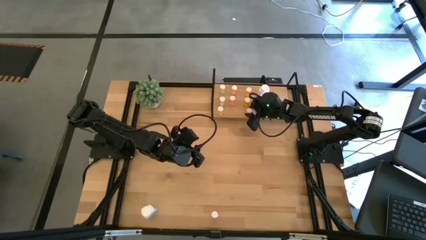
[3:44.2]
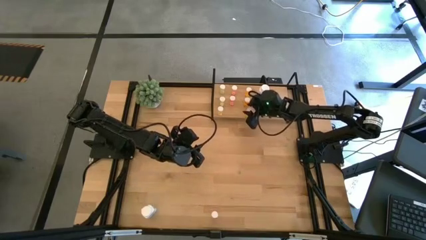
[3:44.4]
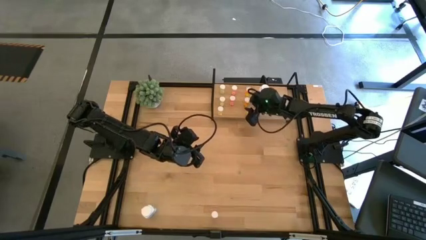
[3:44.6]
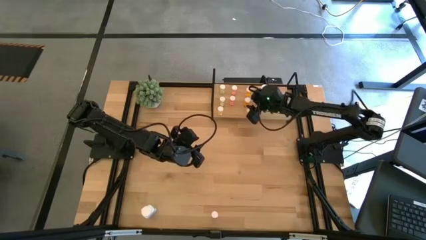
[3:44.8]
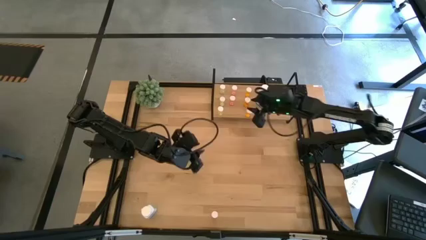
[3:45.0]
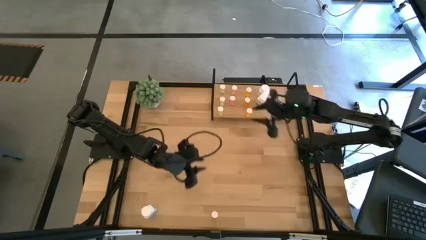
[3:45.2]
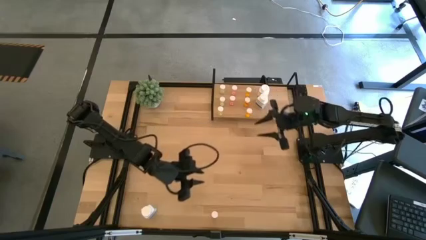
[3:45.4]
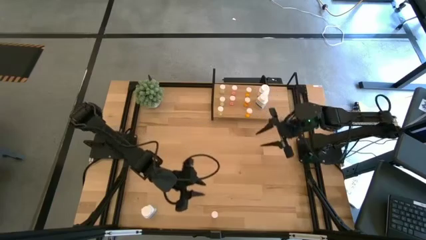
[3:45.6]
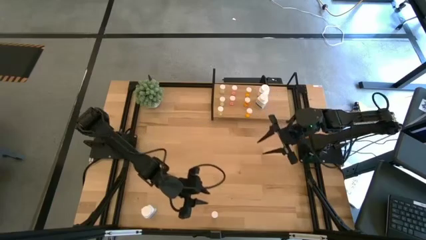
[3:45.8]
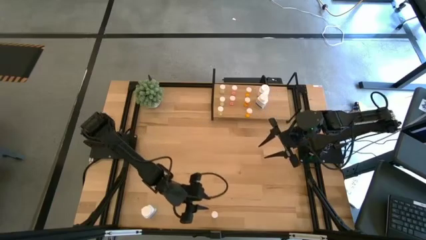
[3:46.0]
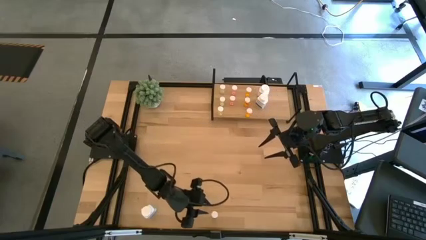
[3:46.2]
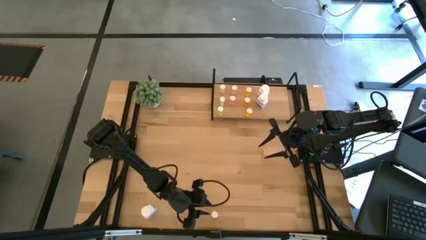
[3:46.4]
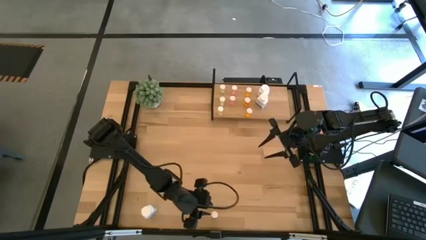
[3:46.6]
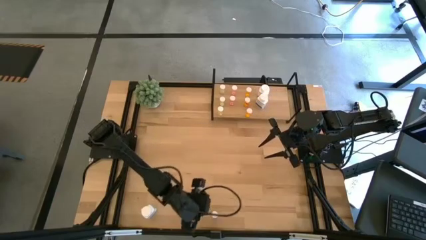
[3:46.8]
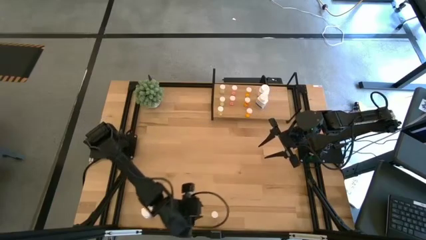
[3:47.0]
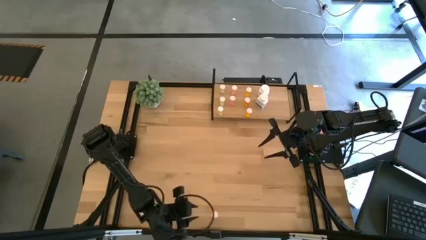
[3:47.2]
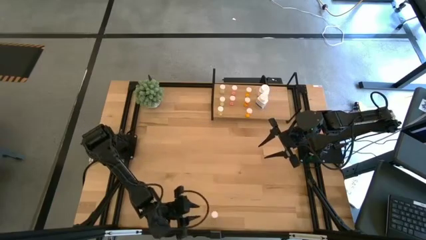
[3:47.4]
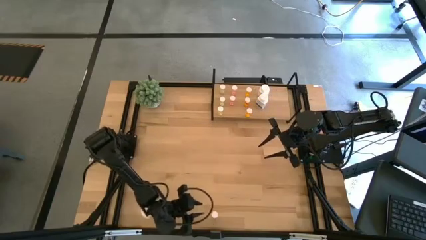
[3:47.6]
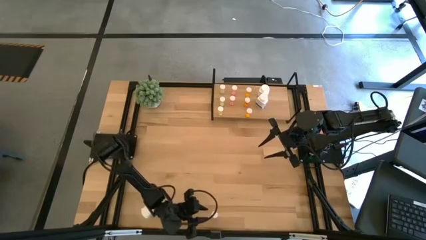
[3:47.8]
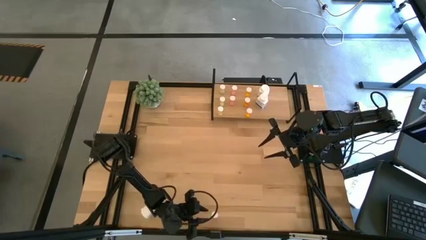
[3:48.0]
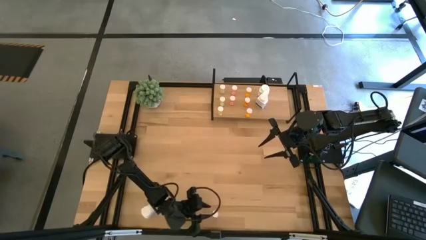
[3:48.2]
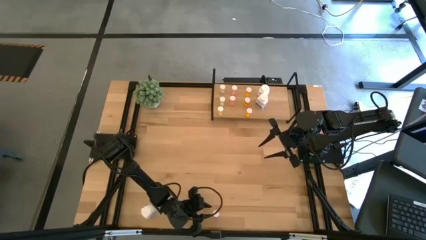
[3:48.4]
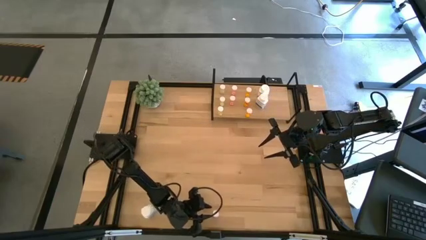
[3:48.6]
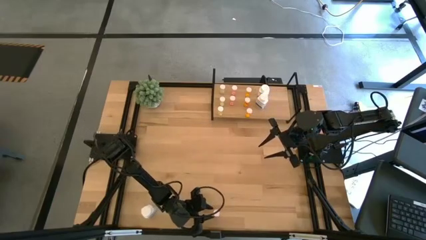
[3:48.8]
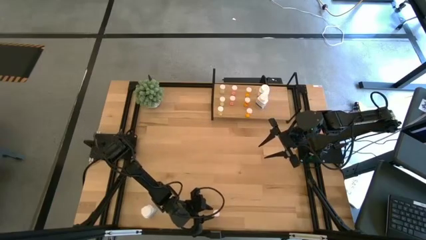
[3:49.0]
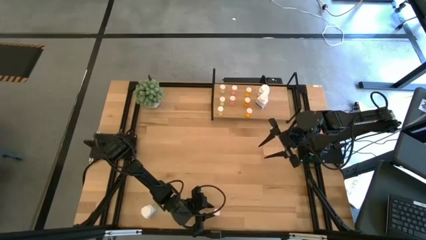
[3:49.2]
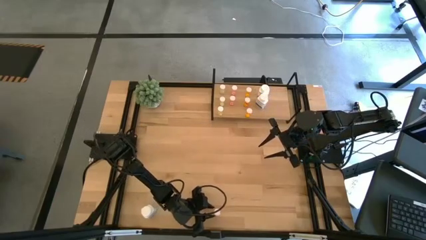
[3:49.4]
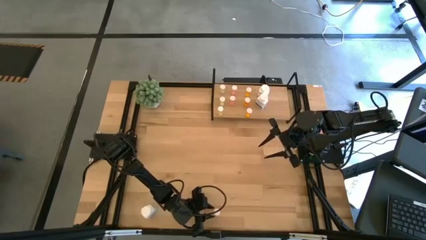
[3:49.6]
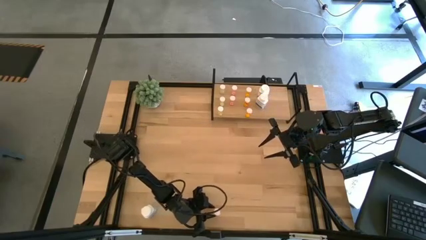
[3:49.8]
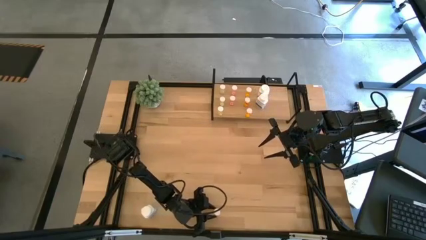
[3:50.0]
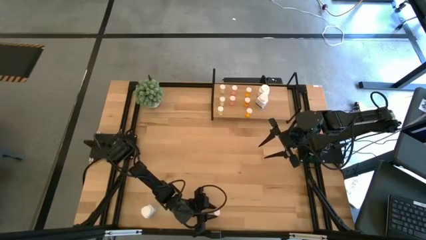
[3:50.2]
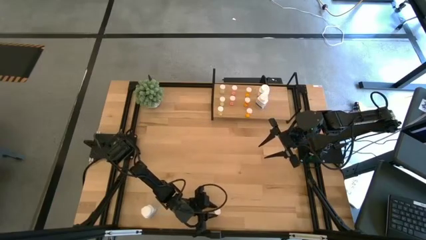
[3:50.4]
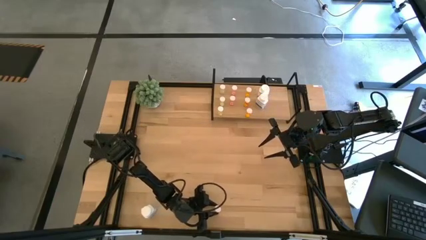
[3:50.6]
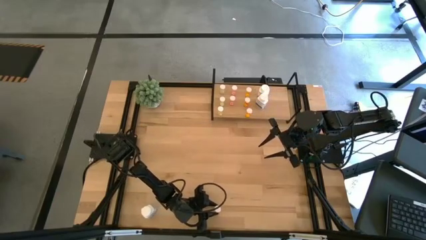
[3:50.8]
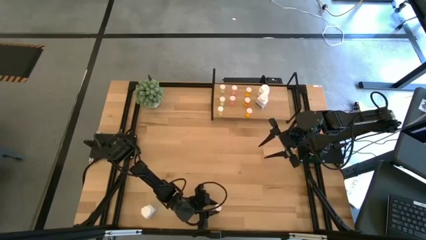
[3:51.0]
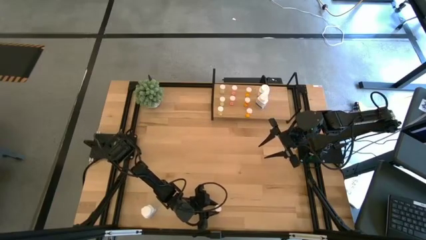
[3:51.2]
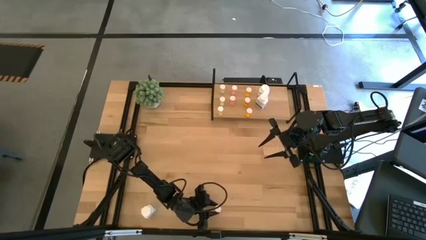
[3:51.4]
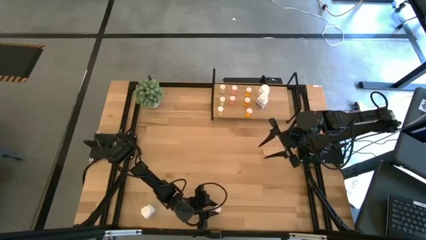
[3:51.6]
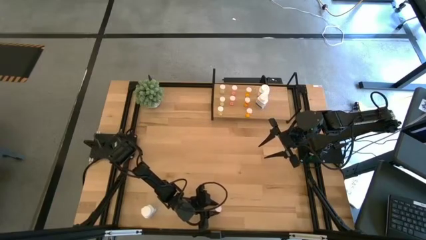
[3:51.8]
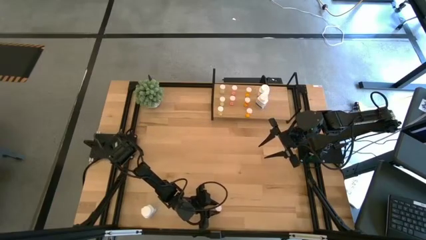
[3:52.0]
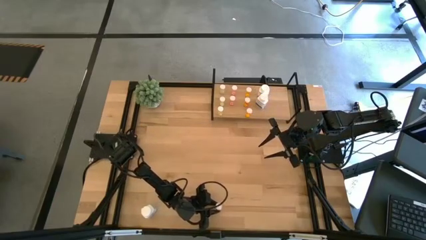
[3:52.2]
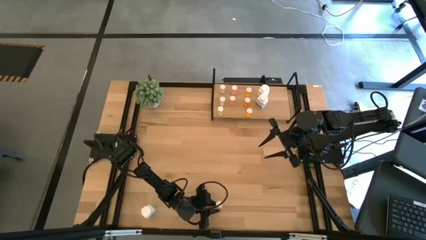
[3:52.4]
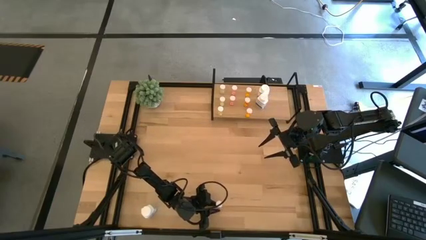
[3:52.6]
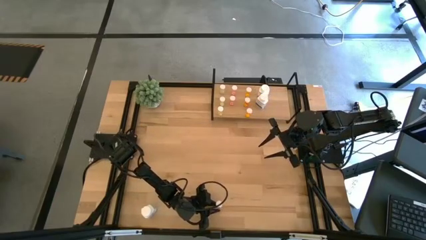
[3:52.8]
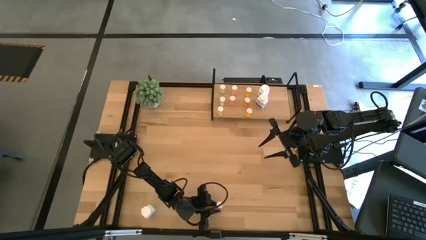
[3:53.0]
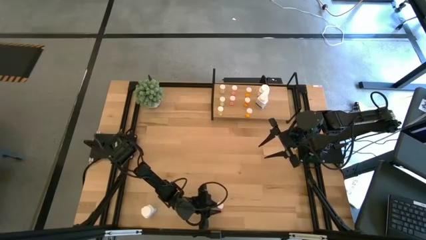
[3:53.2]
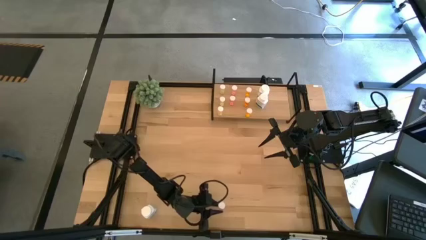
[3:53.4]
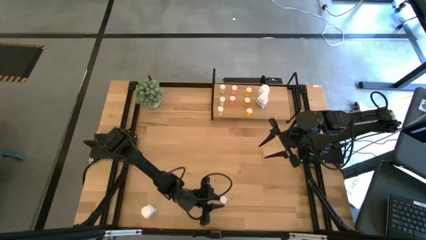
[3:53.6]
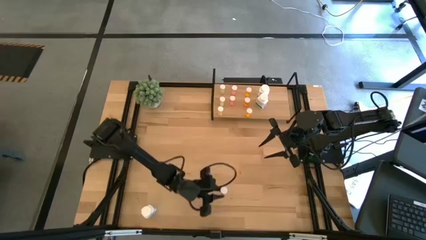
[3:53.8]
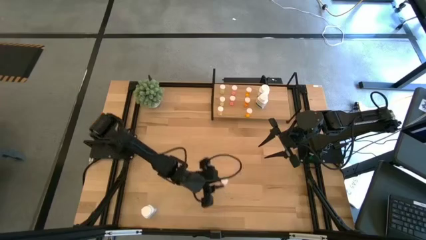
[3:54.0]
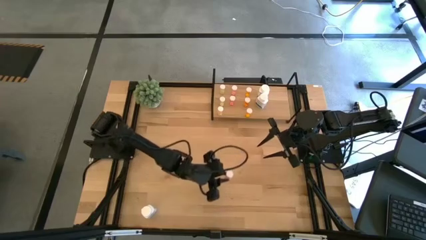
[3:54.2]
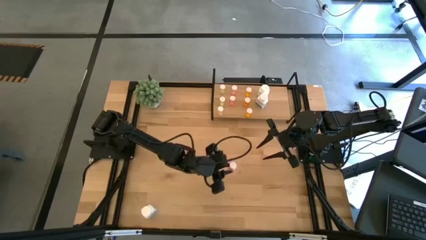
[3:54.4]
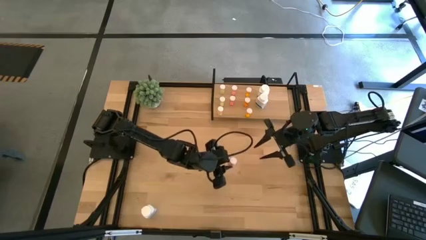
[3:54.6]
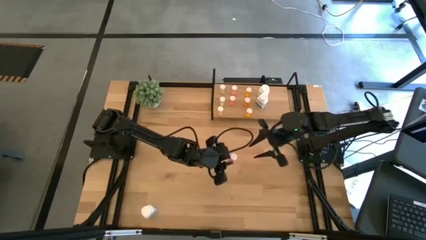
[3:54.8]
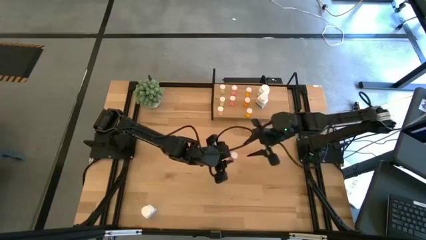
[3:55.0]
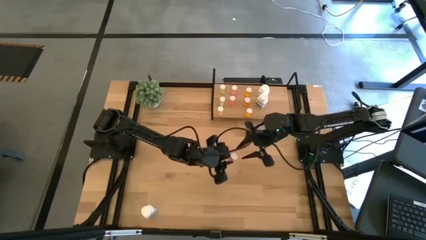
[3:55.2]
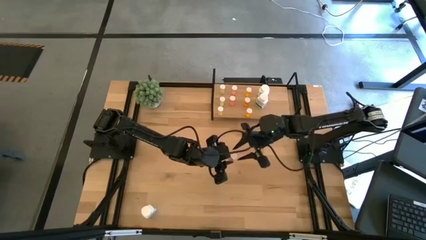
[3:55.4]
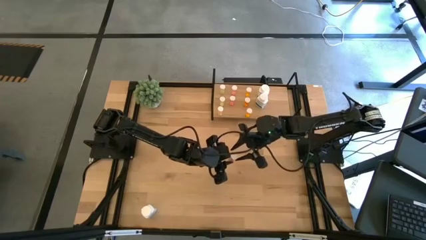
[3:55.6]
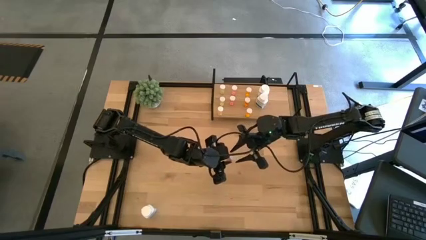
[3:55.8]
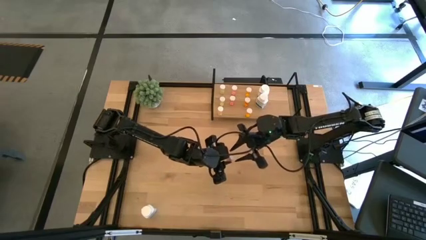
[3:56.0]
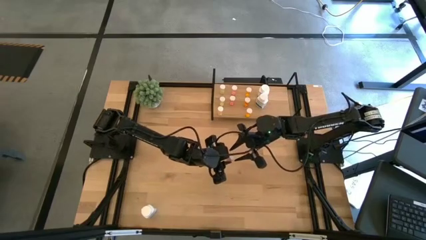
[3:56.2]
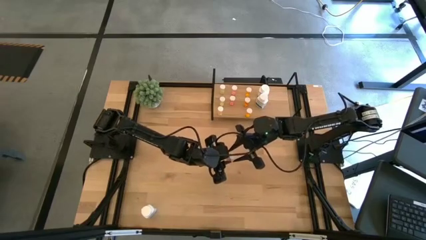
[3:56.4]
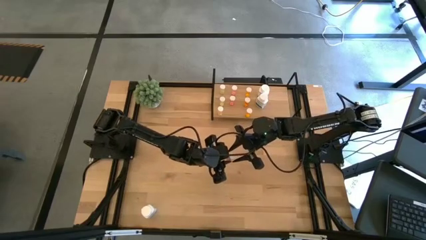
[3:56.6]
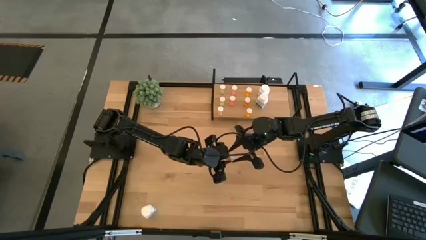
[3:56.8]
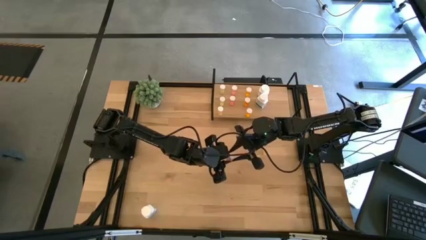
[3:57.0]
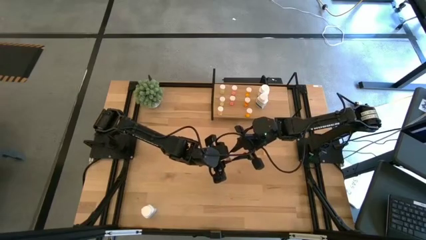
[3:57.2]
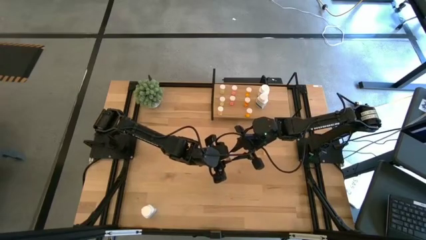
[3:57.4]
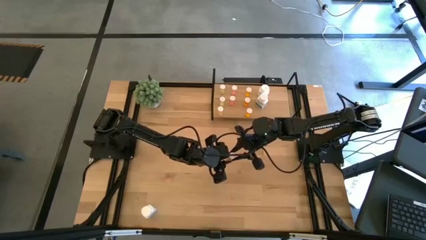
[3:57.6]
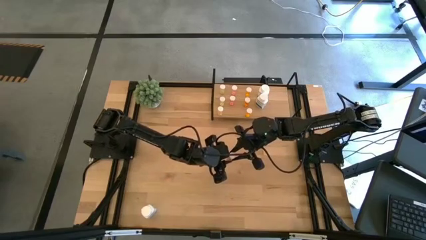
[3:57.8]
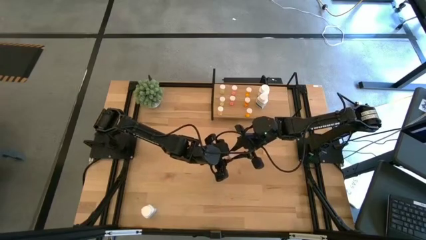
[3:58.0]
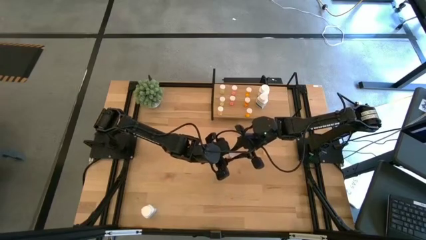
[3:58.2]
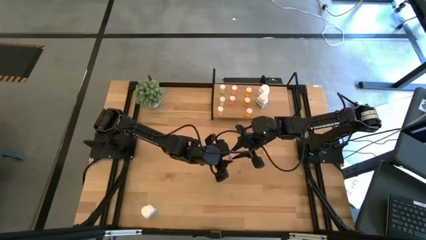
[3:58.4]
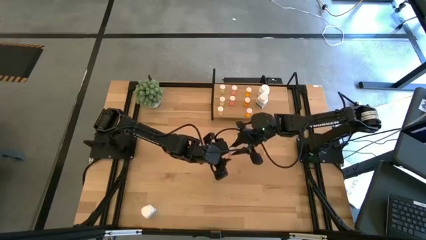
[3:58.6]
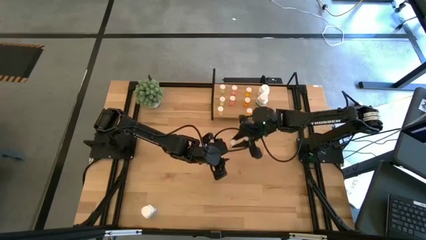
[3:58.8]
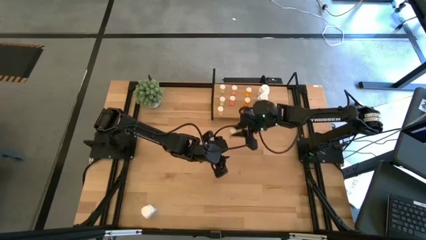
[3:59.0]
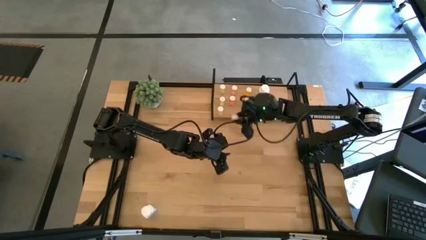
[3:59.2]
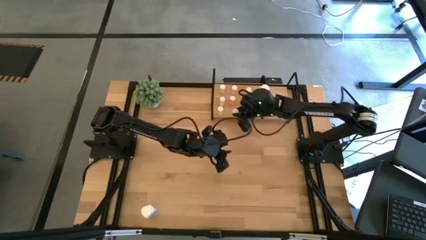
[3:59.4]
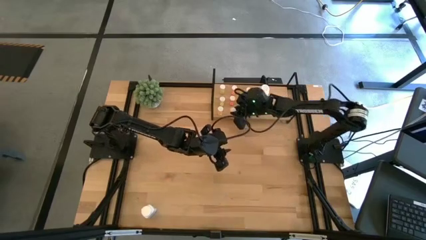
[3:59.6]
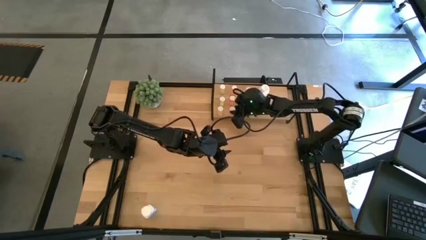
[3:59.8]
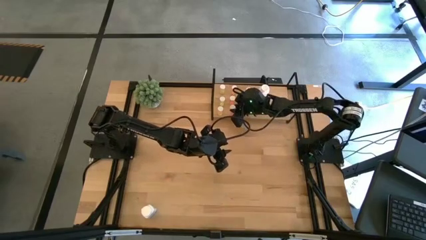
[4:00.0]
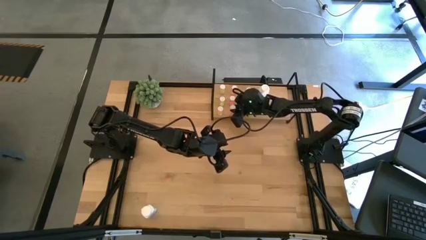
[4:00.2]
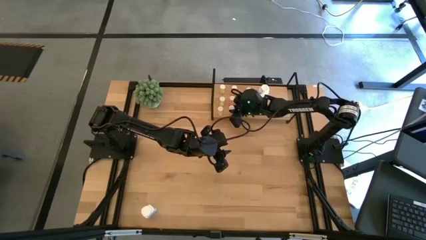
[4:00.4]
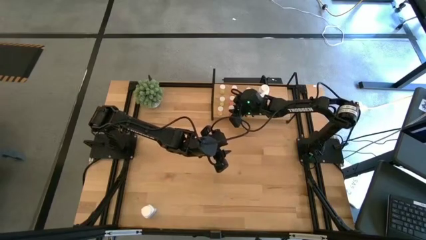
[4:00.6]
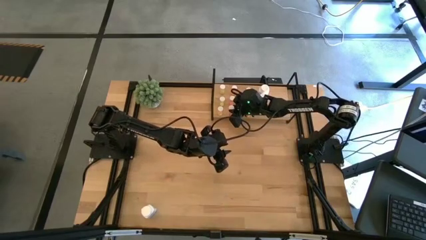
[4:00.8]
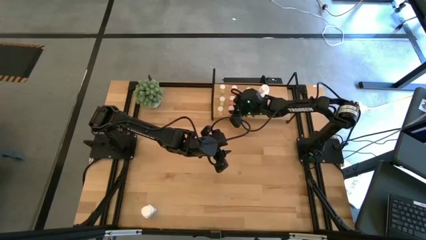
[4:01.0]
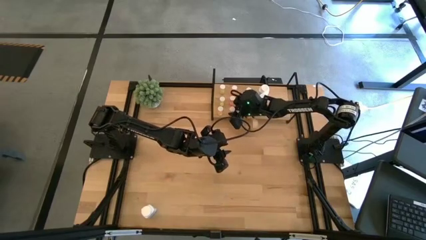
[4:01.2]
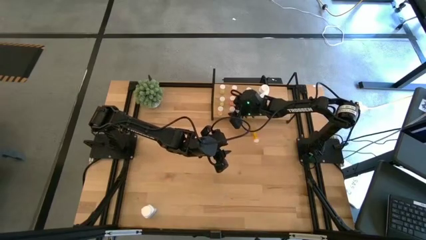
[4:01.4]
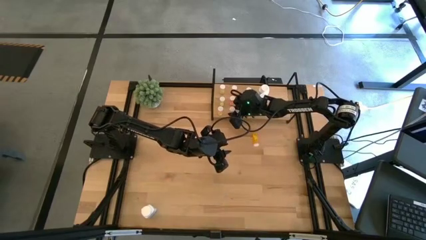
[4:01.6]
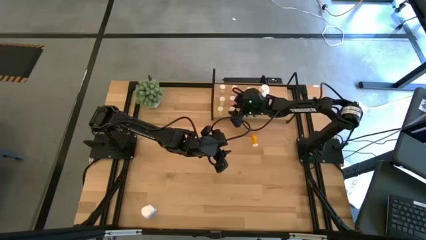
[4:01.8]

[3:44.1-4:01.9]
Task: Pick and place medicine bottles onto shelf by color
Put the pink pill bottle on the shelf aligned with the other pink pill bottles
